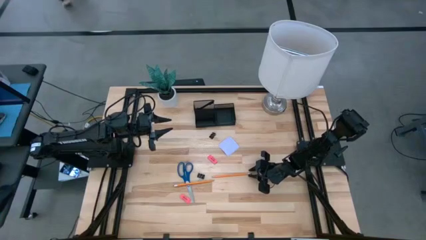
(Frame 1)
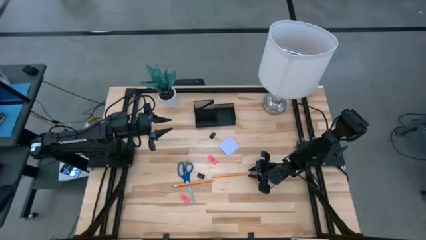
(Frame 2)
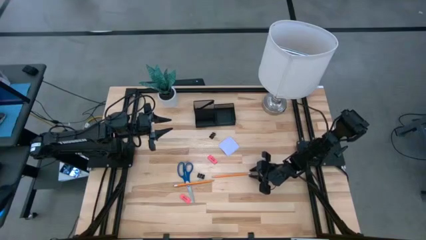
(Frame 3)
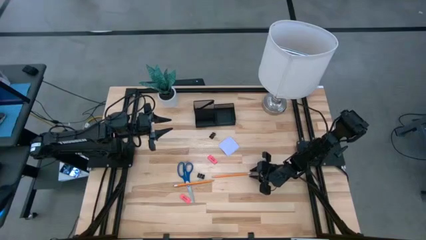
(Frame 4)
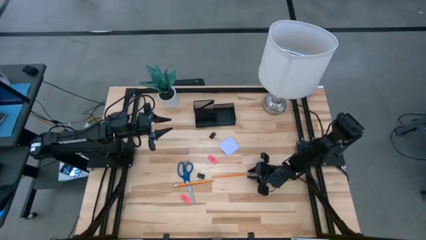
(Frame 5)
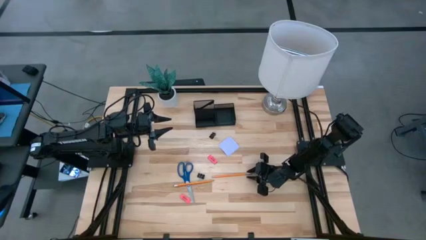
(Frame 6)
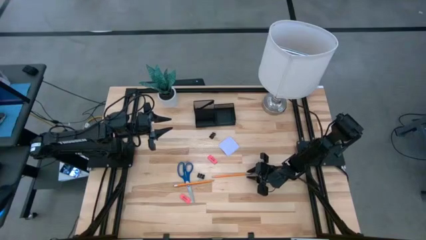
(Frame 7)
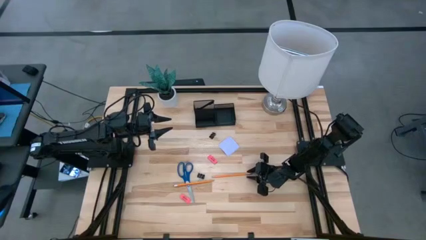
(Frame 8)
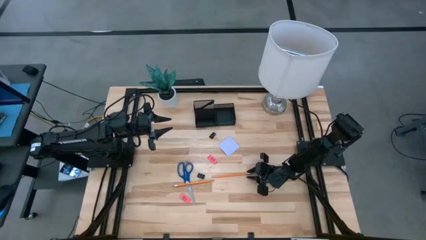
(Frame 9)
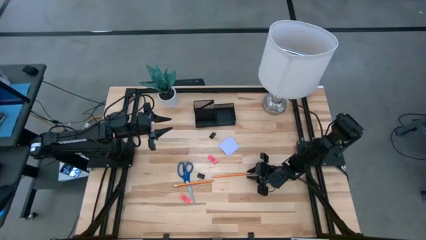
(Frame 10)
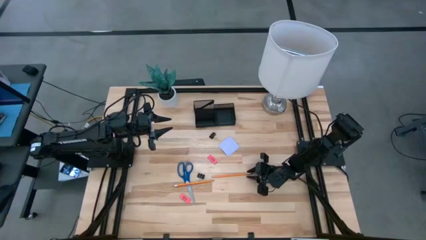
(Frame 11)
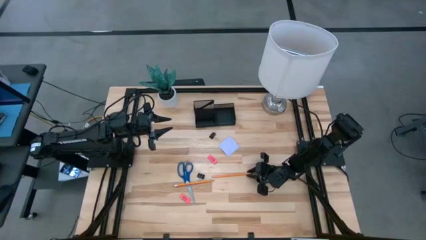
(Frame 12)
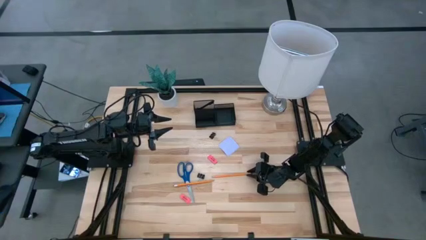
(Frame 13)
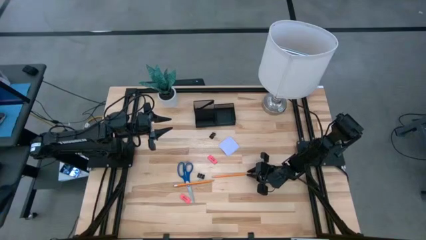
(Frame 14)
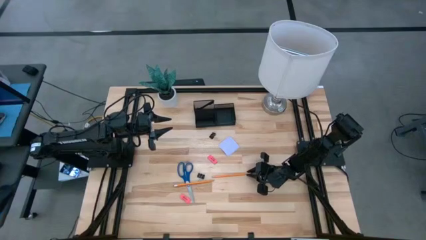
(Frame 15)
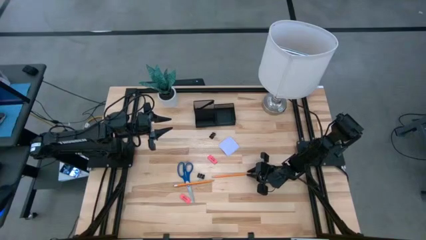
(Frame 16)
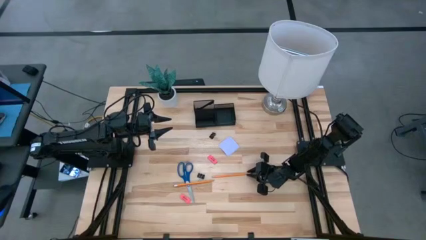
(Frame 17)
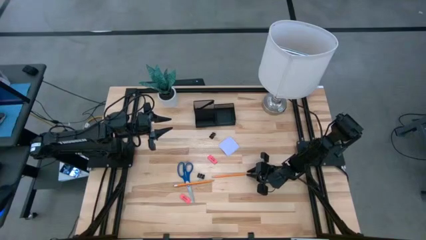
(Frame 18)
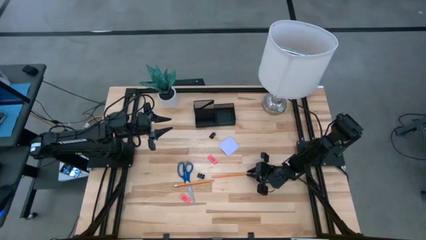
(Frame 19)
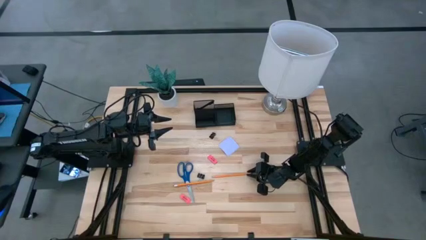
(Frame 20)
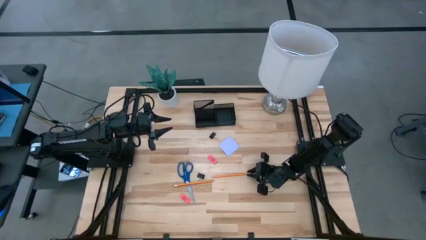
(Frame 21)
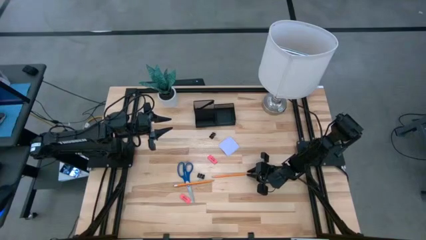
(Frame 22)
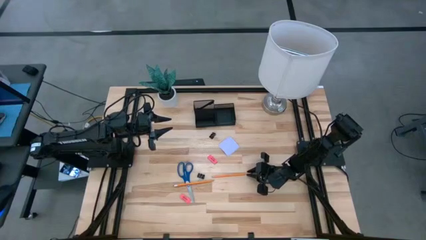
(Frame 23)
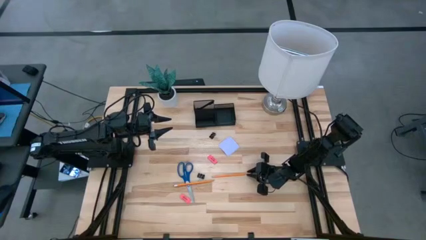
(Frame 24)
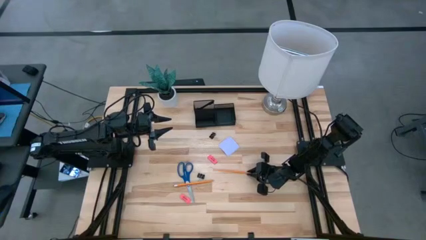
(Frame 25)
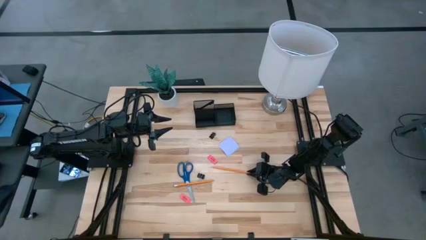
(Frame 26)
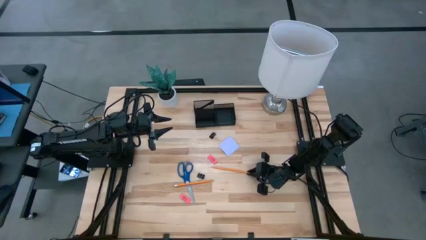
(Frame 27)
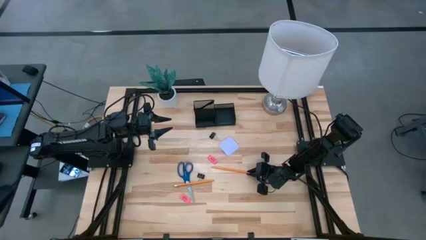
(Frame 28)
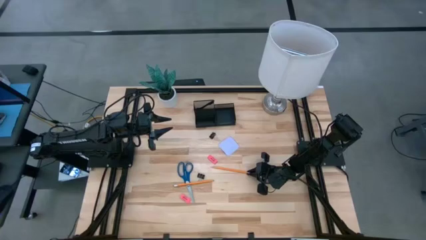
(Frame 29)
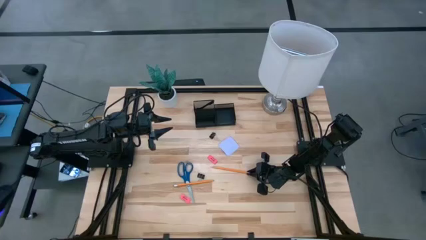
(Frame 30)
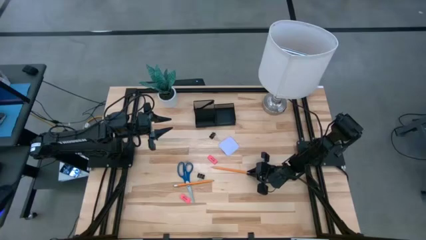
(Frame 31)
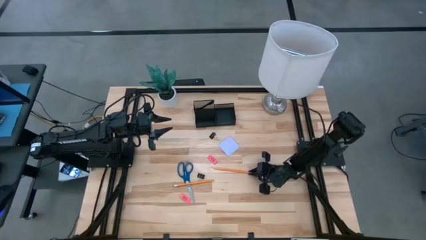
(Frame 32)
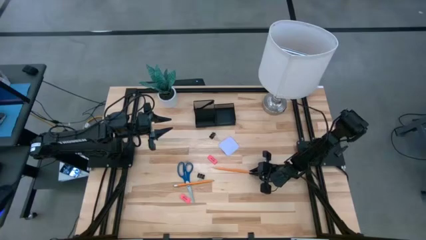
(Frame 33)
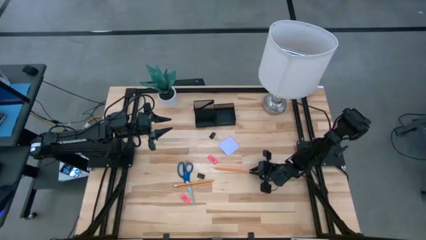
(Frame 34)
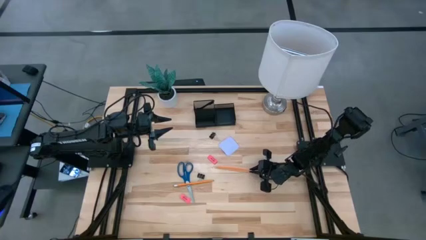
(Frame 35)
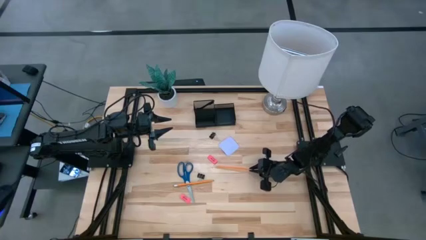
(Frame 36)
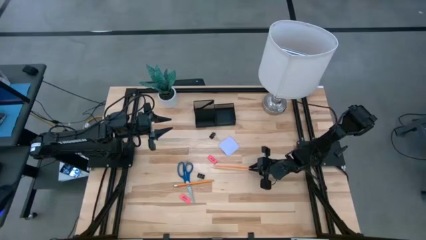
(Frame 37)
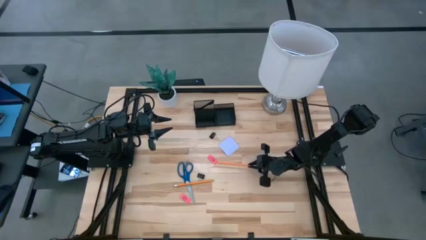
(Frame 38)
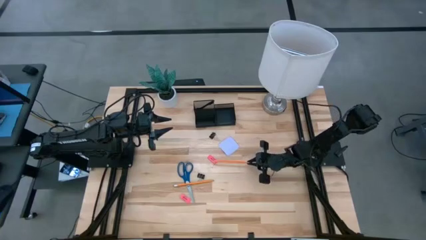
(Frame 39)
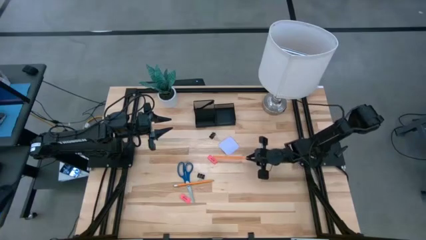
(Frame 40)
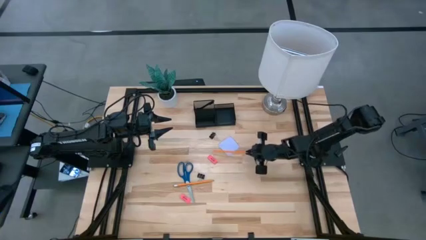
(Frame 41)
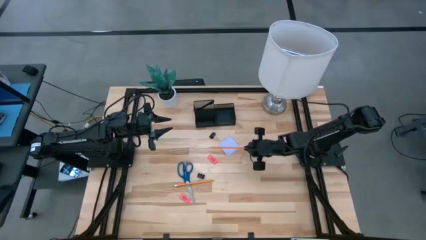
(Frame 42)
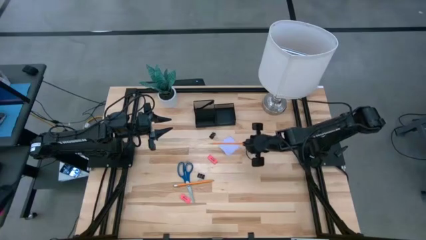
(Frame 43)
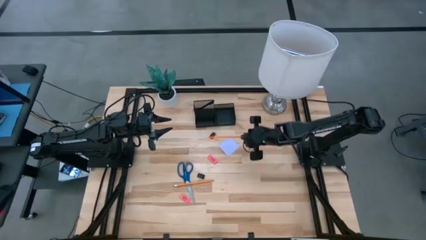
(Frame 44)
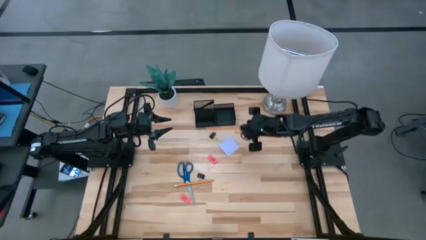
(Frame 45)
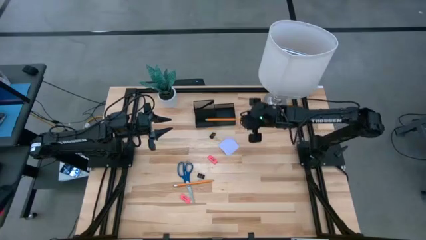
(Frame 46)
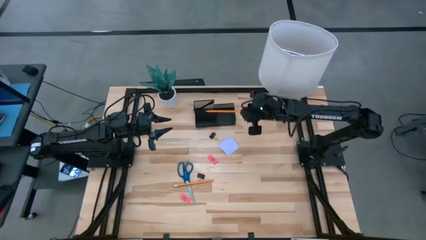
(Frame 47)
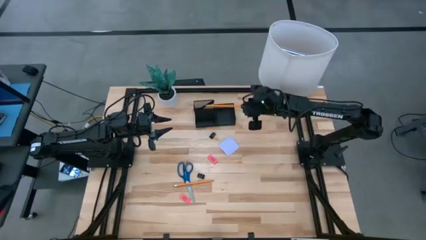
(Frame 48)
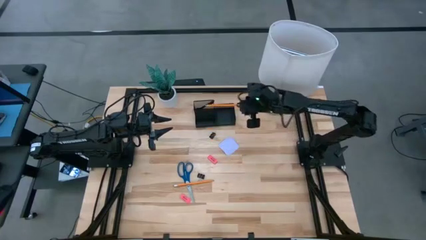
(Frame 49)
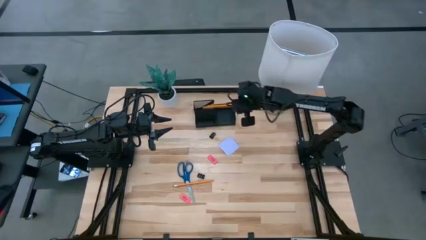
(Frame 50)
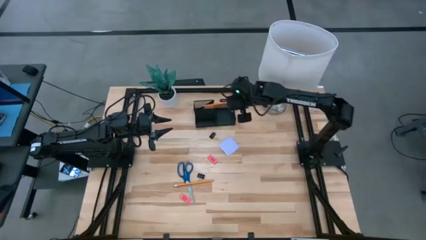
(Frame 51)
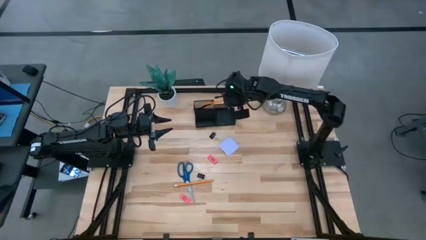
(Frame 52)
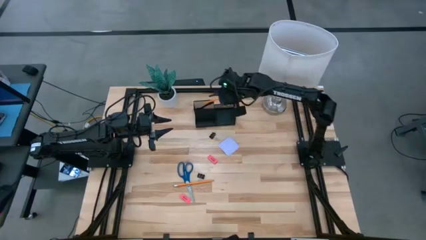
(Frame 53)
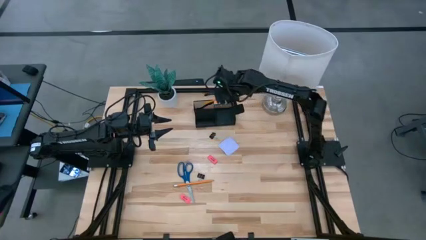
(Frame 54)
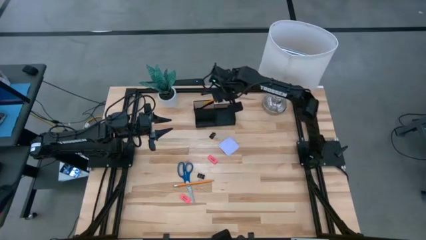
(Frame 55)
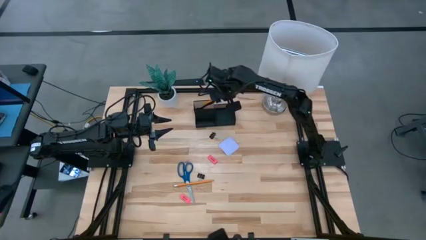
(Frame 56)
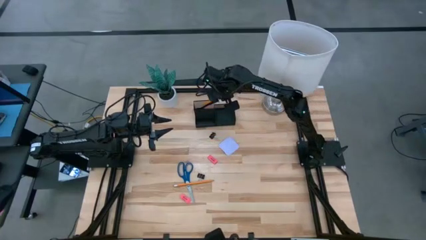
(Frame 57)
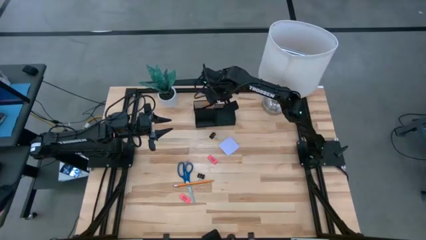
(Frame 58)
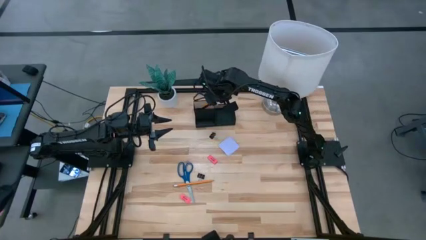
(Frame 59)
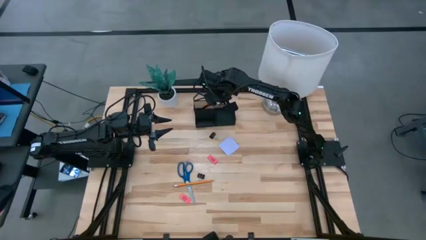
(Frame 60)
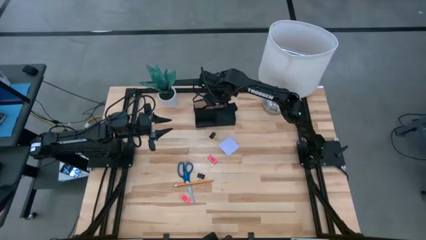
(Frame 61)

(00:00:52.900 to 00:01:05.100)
Task: Pick and place office supplies into organizer
Put the right orange pencil into the black desk organizer
